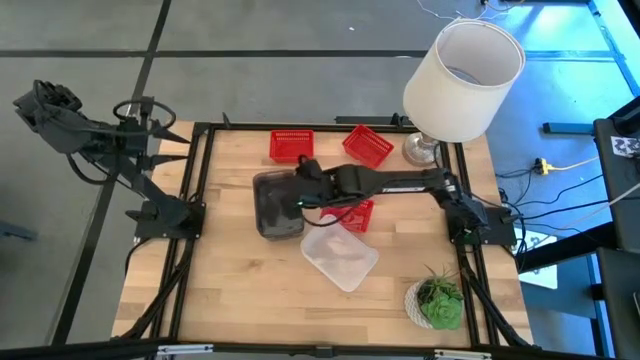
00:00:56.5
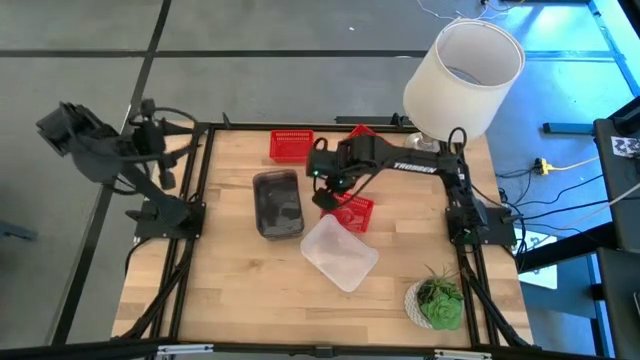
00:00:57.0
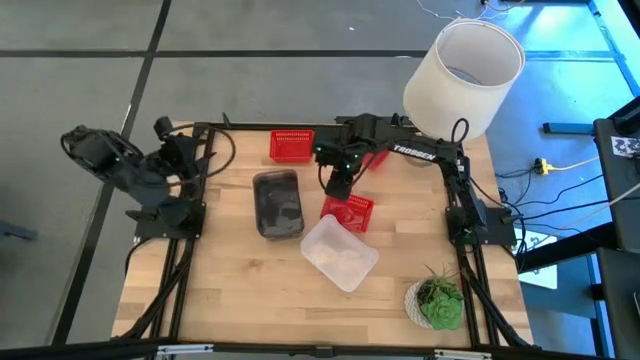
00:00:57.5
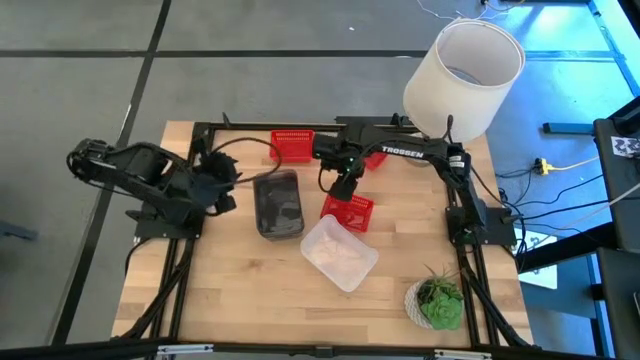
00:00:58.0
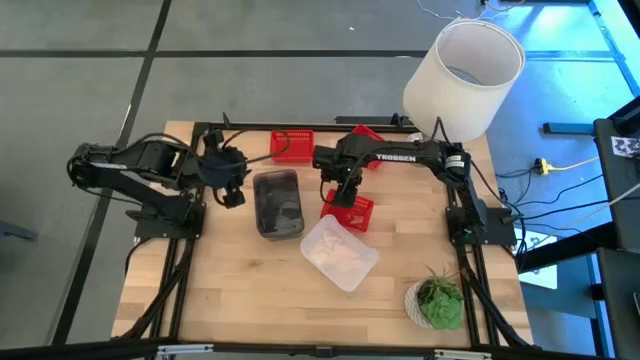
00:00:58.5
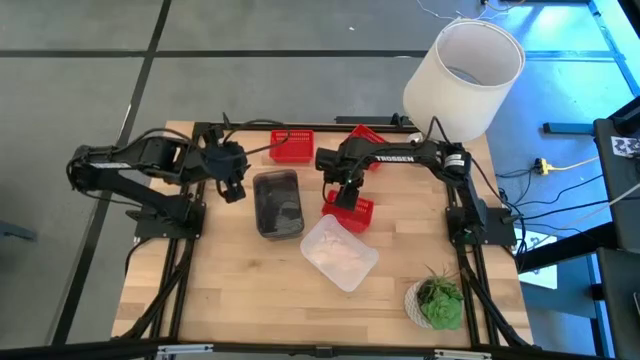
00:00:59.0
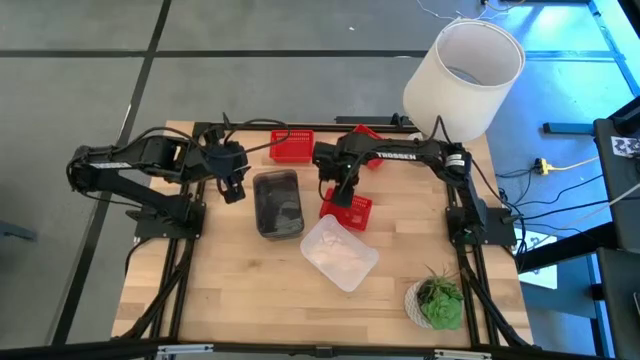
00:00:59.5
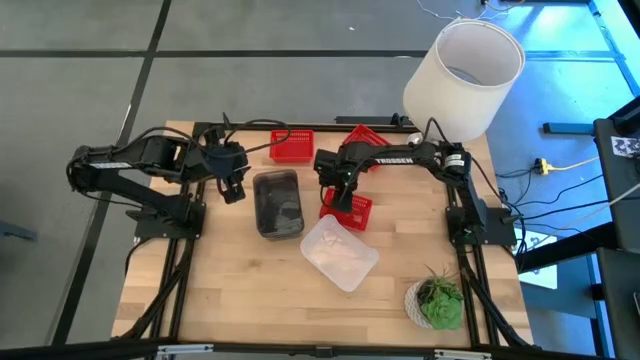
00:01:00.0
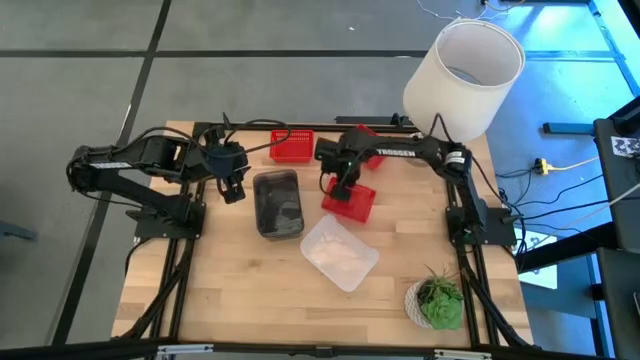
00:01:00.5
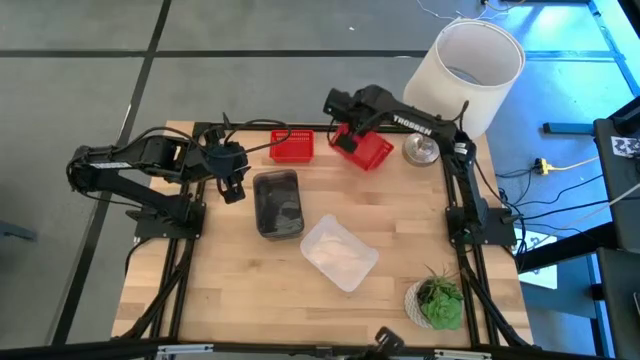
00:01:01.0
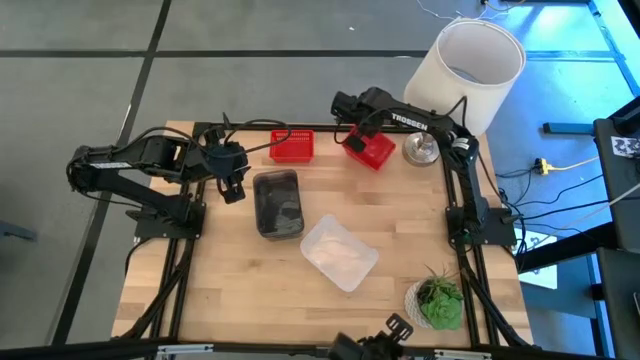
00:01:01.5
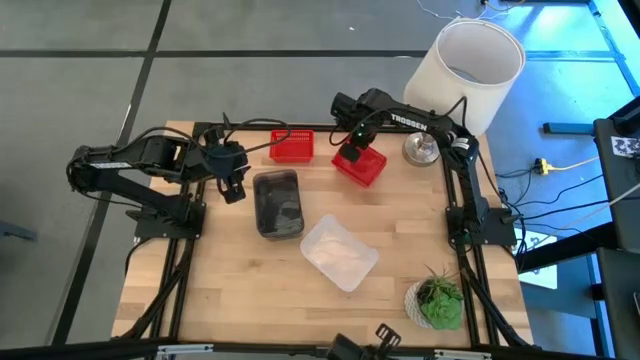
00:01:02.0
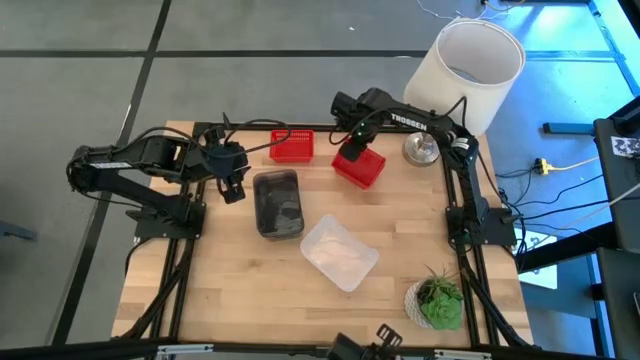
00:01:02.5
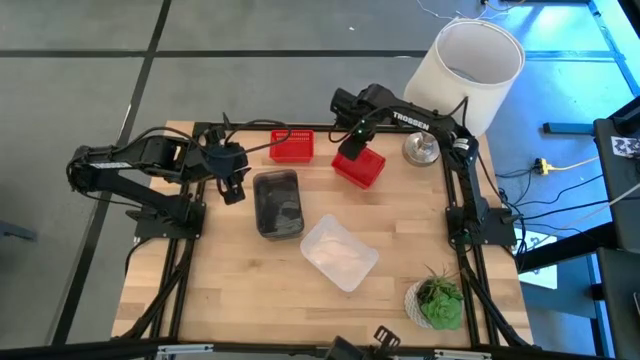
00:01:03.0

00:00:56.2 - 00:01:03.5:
Stack the bottom red bin on the top right red bin

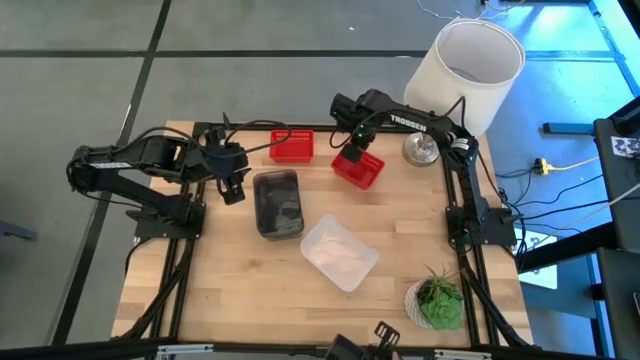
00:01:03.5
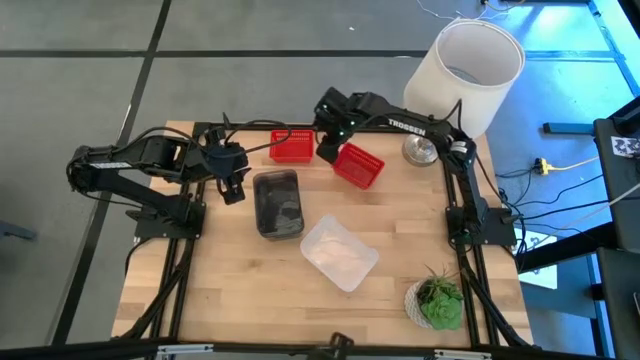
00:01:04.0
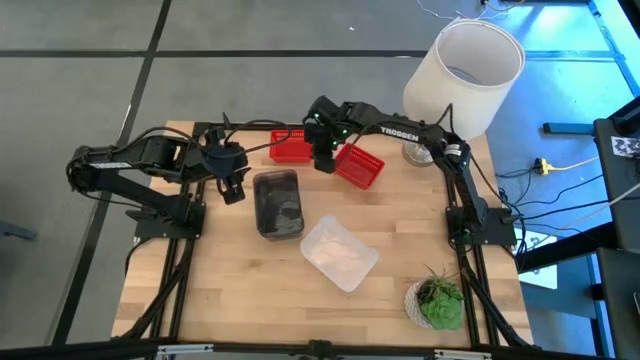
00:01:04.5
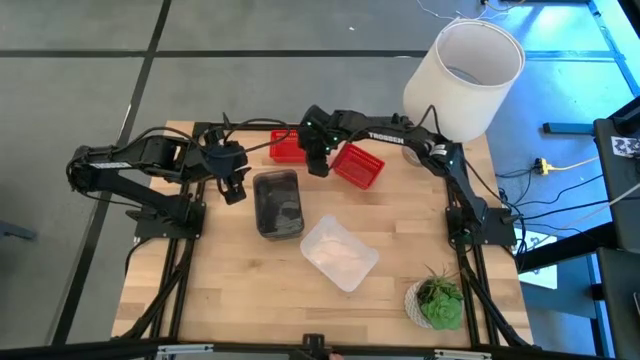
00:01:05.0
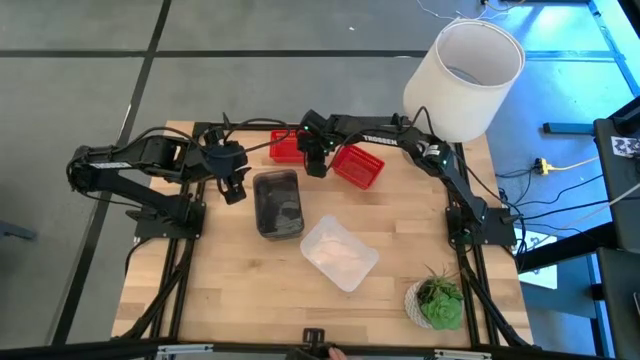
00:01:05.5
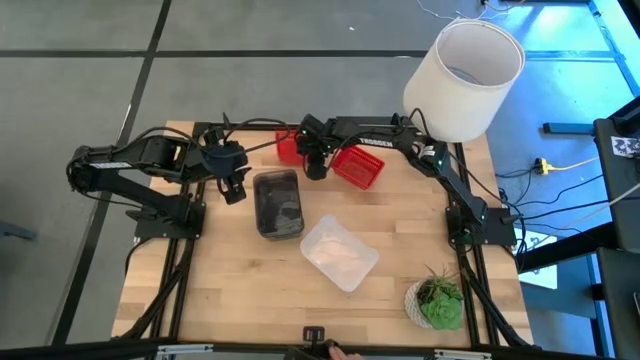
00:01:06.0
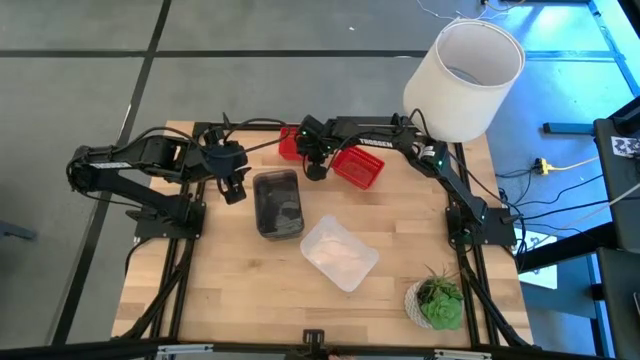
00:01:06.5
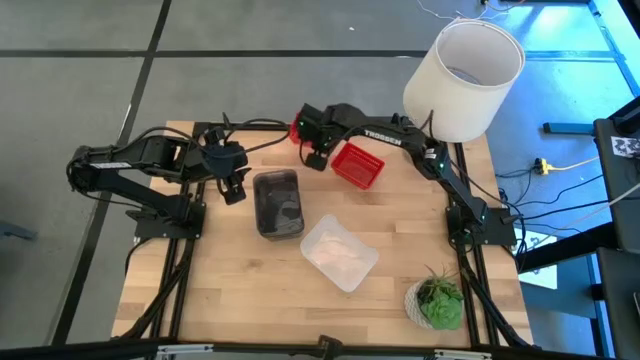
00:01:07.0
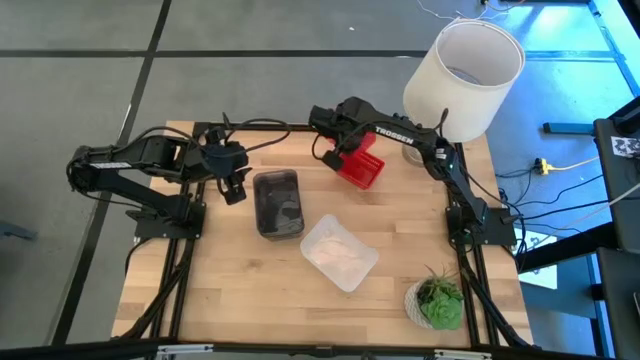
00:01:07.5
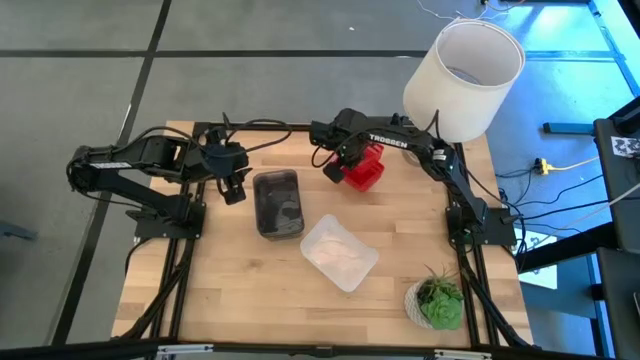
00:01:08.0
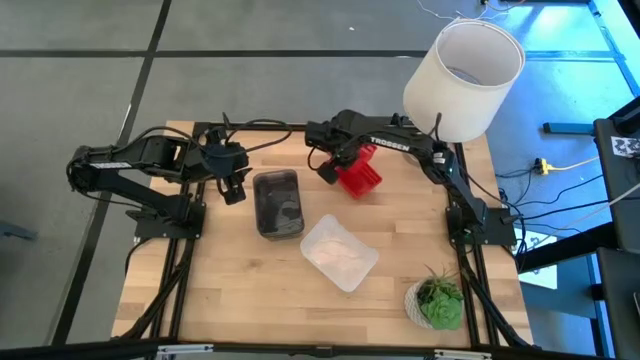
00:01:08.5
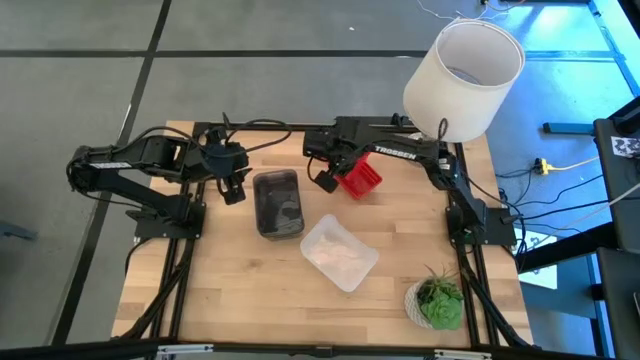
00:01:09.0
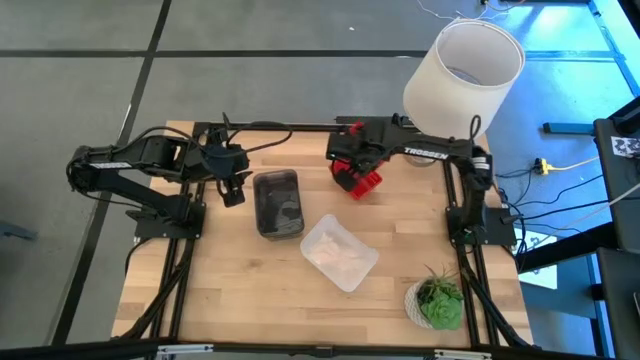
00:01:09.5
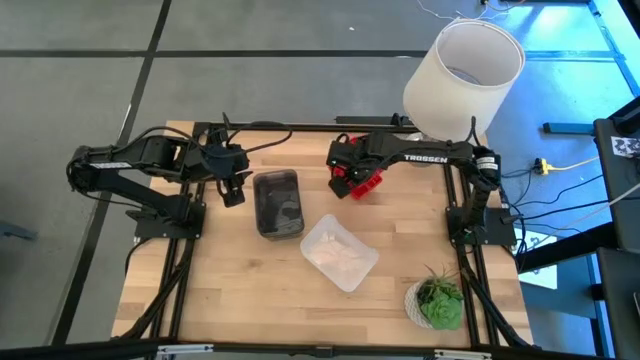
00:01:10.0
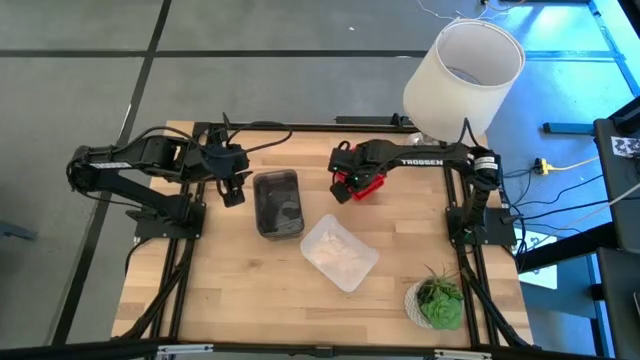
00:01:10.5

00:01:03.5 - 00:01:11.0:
Stack the left red bin on the right red bins

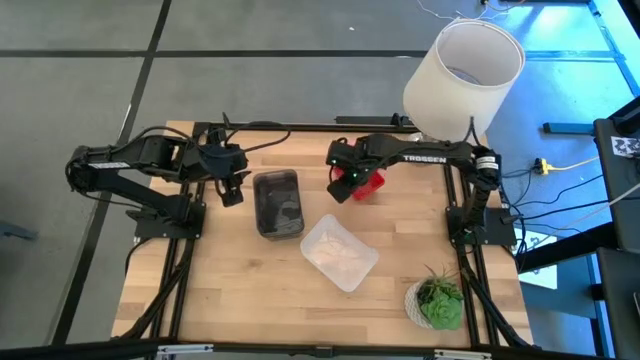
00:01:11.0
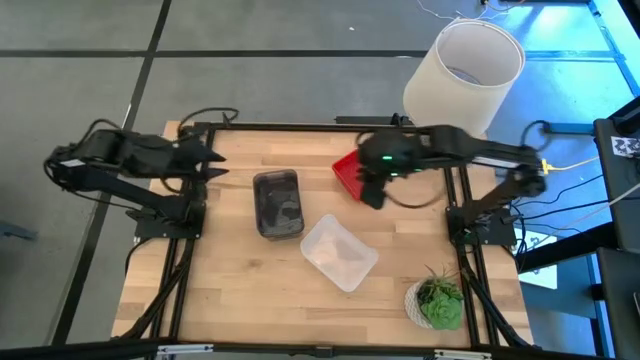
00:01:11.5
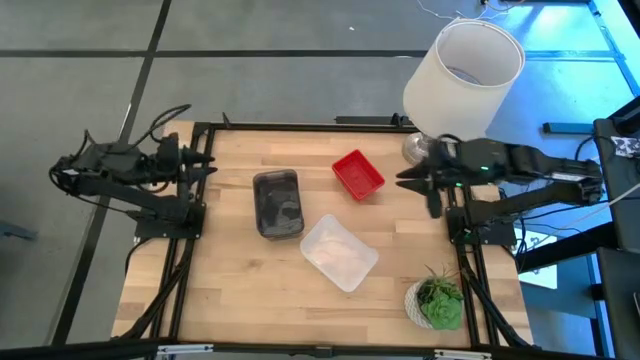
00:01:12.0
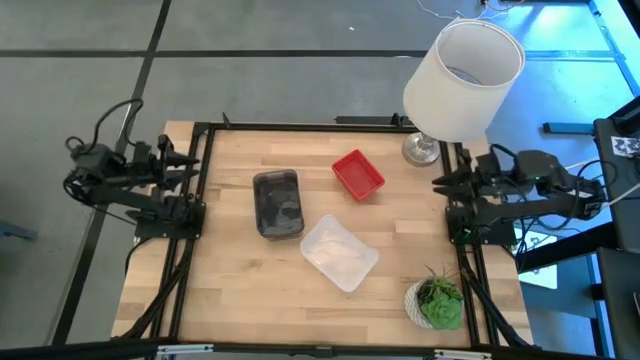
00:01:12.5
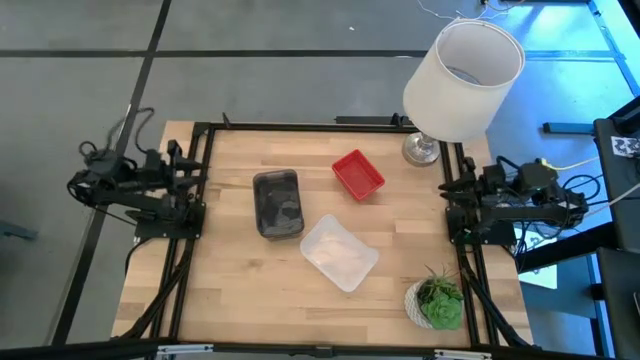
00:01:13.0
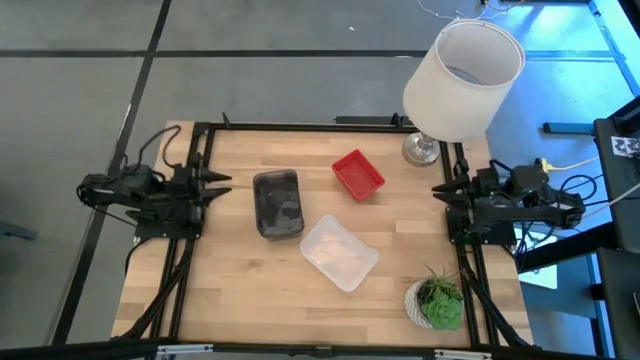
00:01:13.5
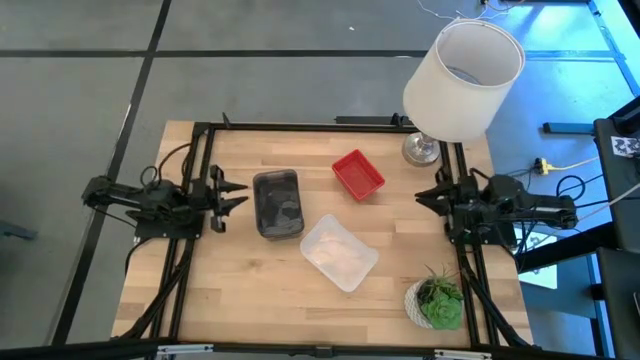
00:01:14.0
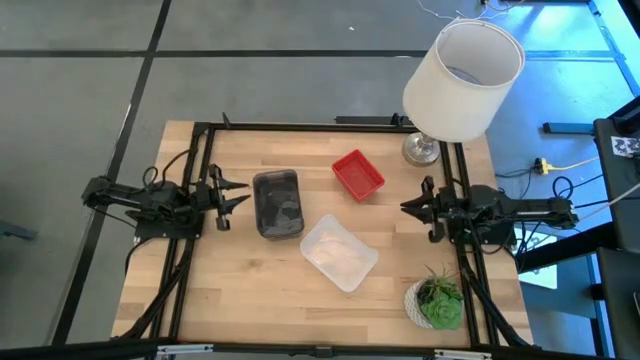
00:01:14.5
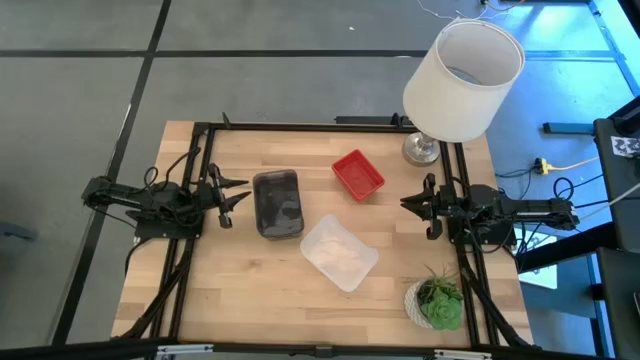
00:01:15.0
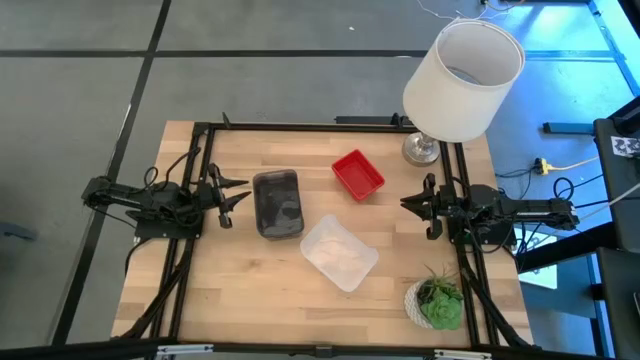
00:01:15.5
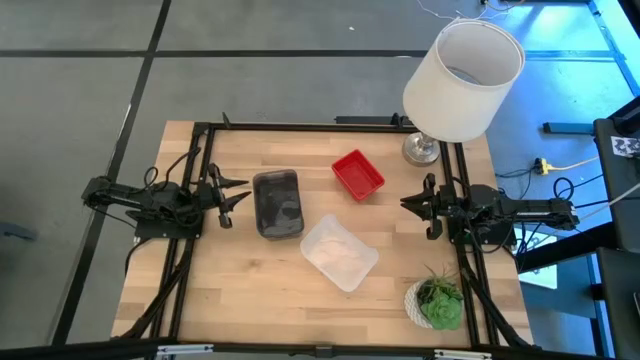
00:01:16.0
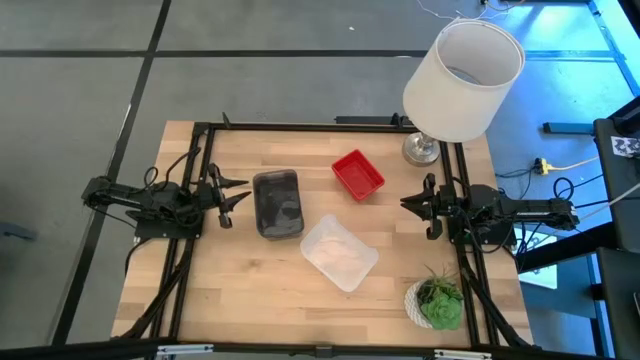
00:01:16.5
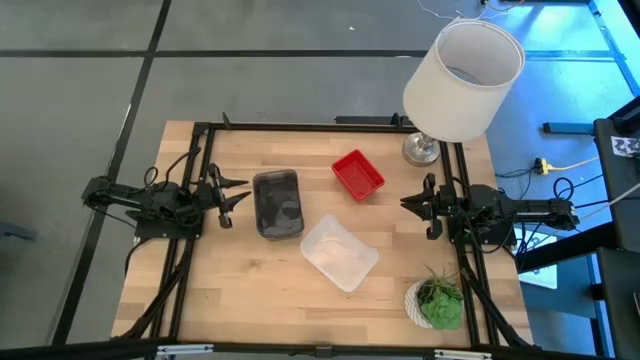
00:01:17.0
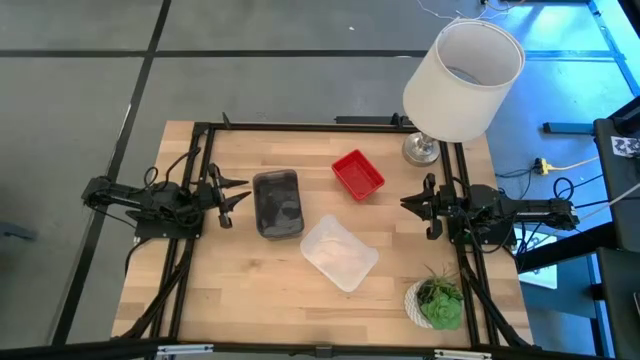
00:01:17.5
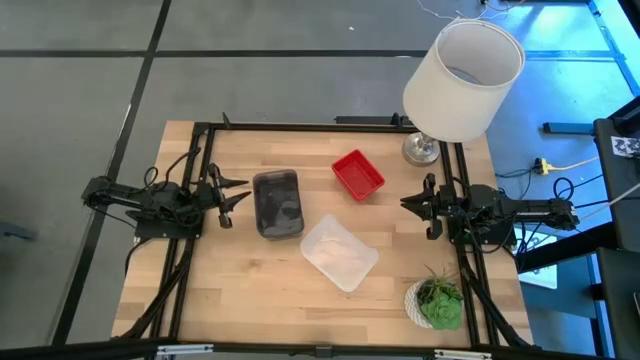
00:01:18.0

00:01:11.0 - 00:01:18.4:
Return to Home Position
